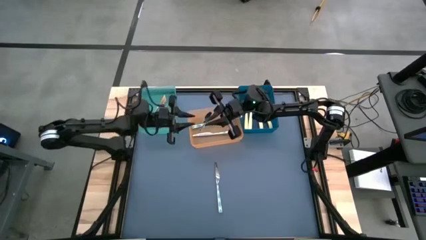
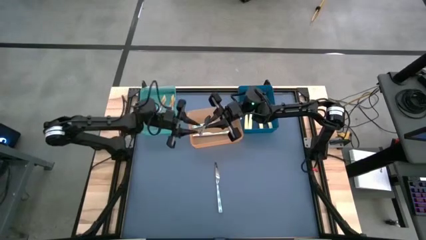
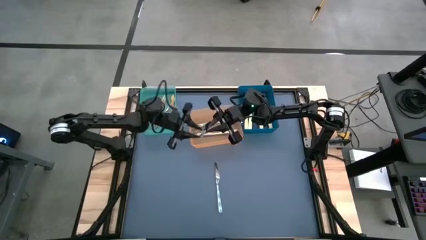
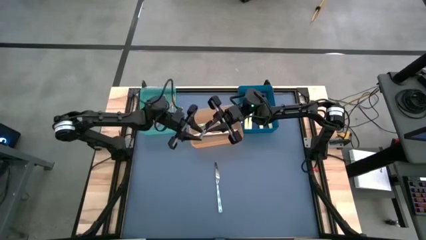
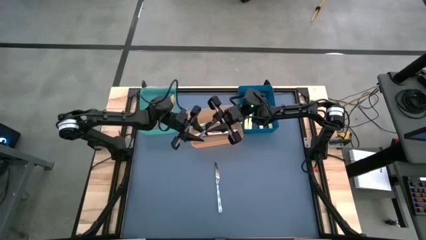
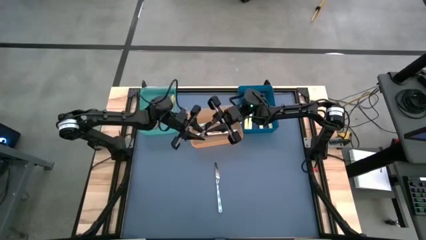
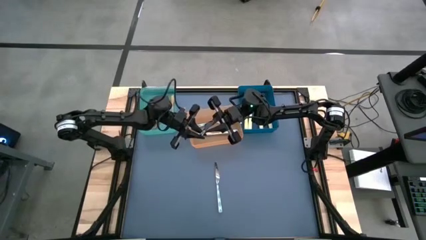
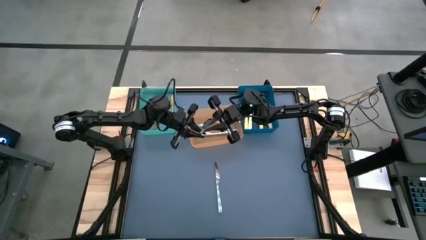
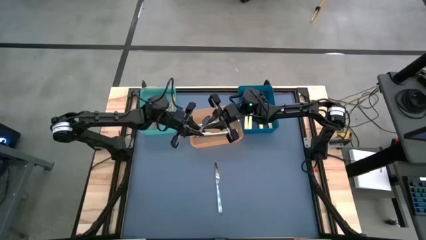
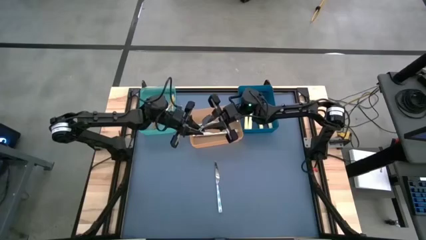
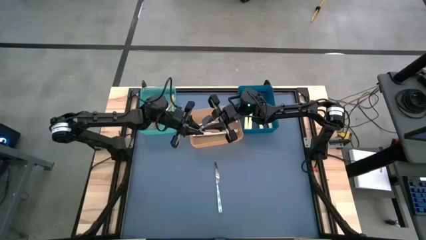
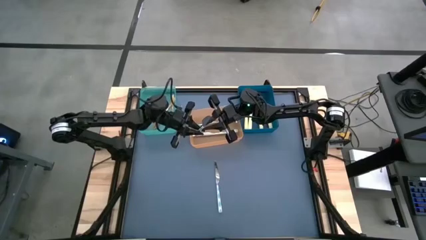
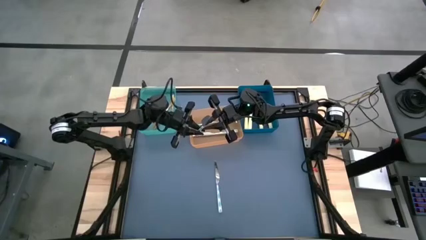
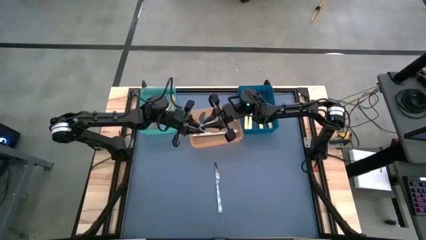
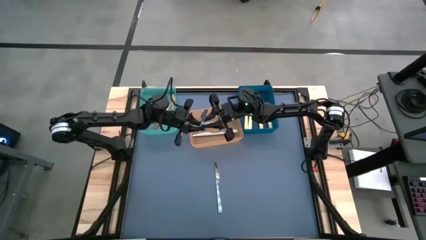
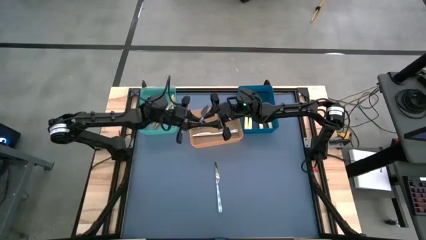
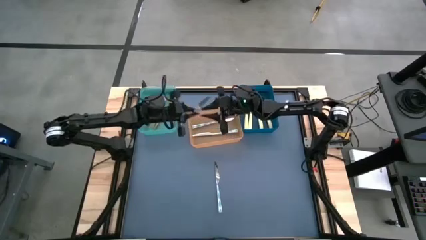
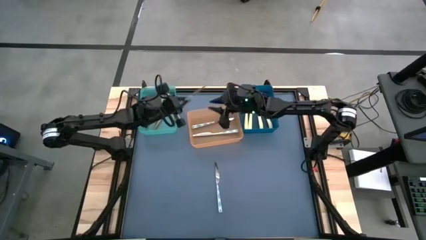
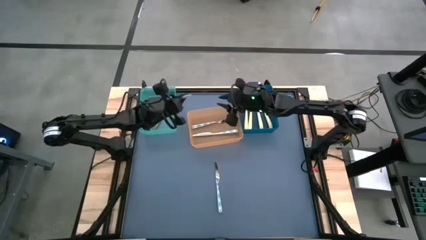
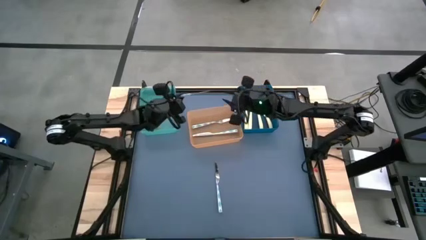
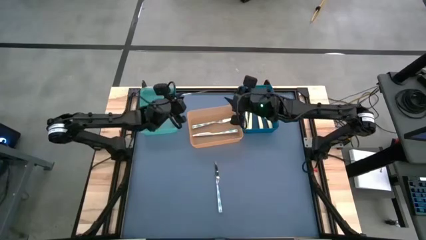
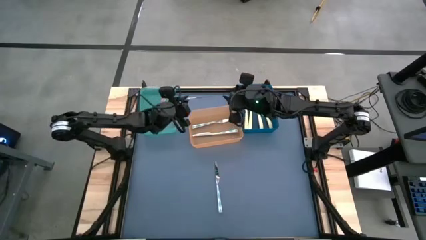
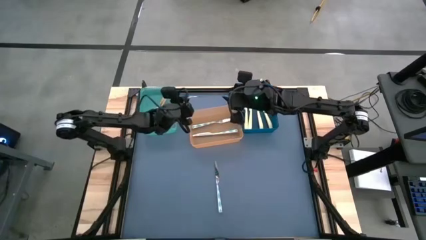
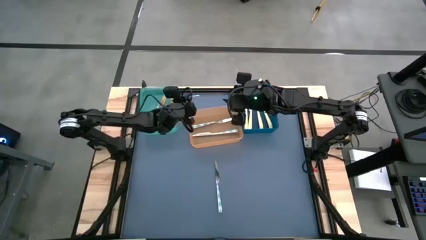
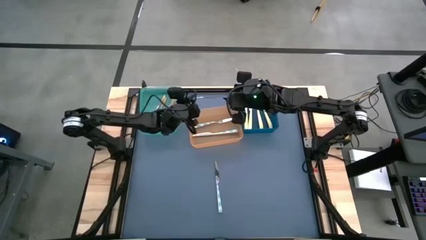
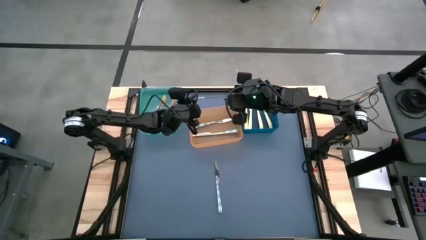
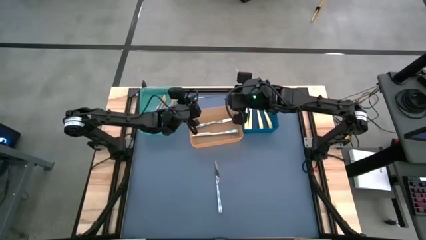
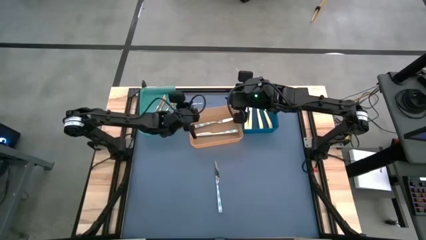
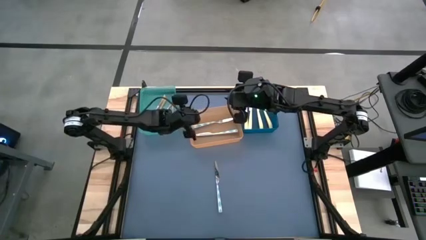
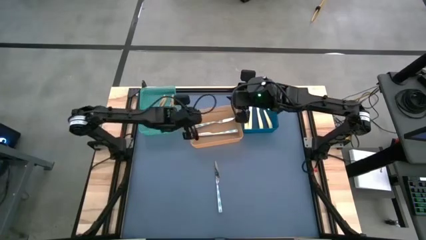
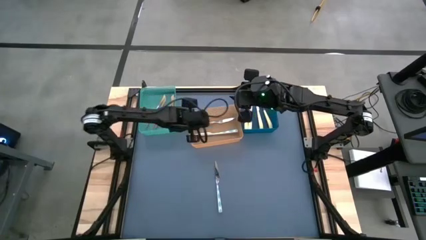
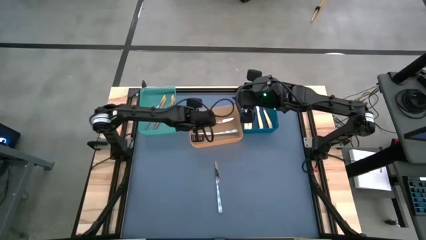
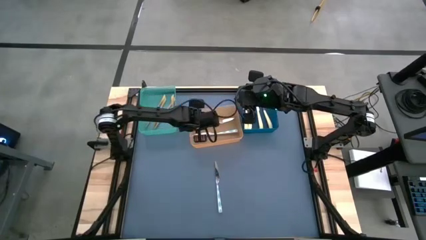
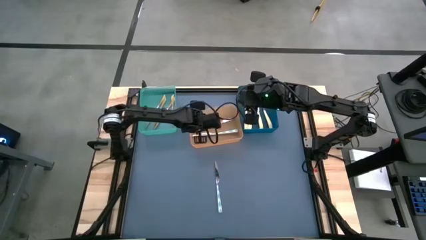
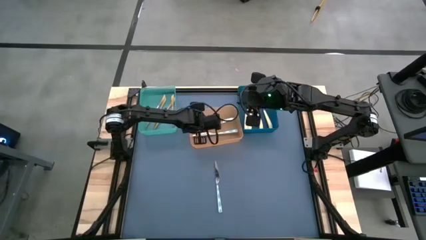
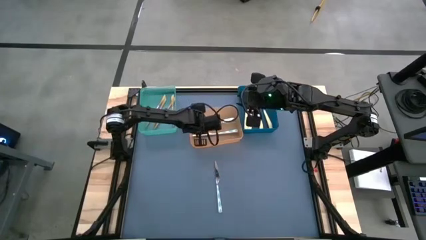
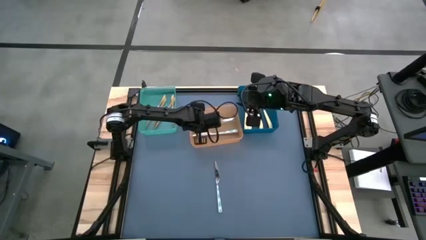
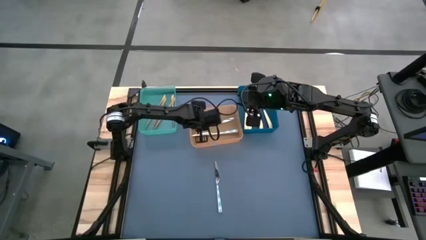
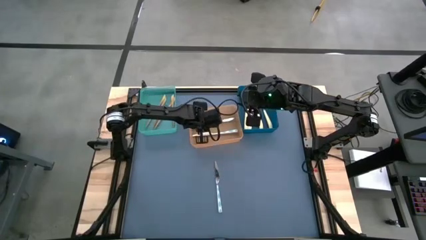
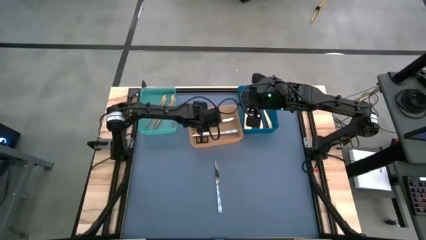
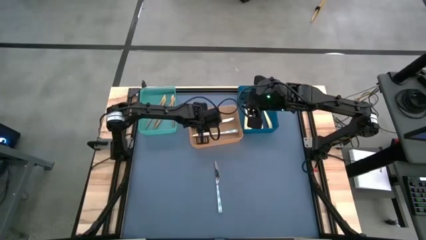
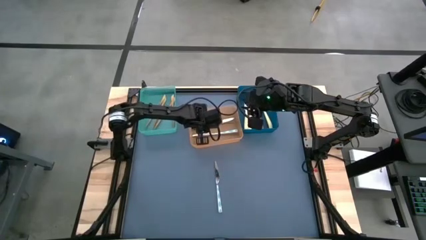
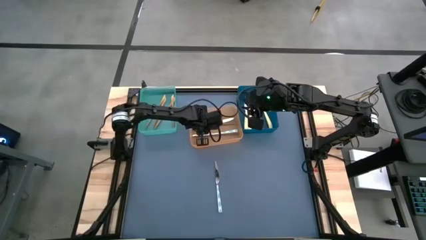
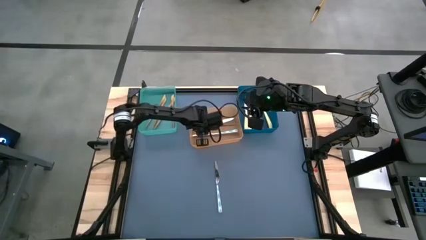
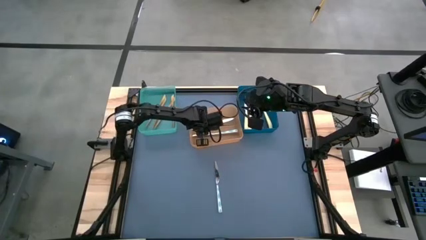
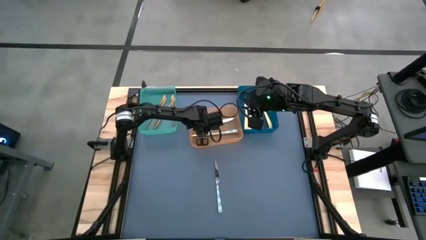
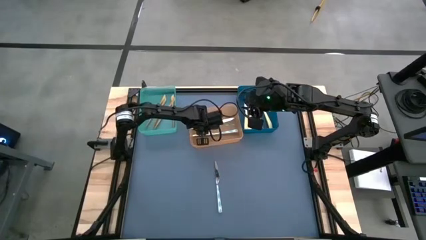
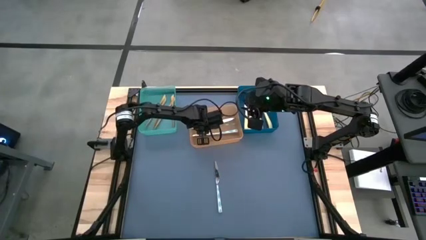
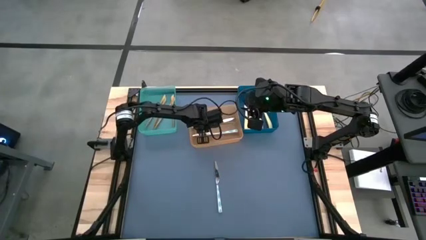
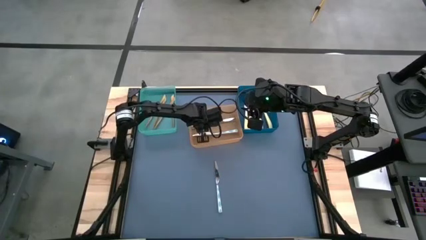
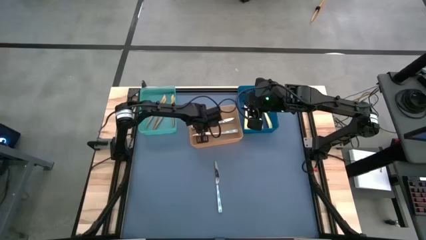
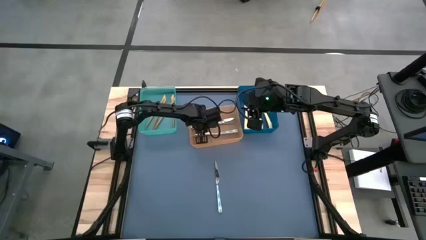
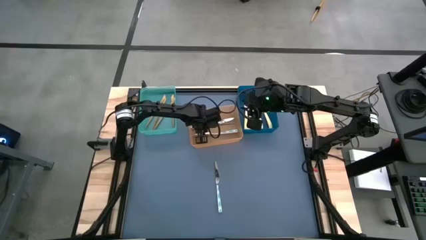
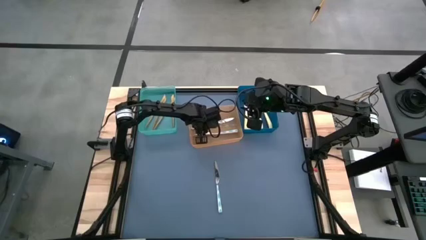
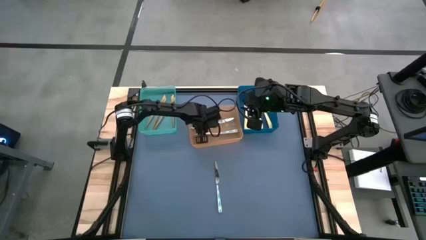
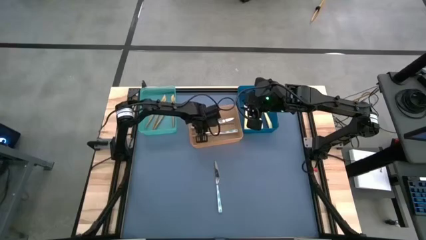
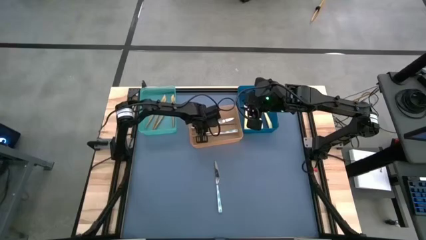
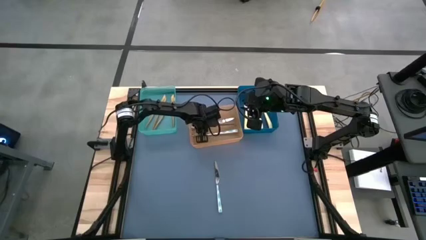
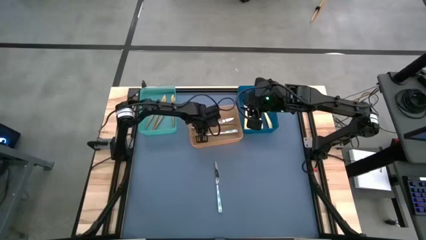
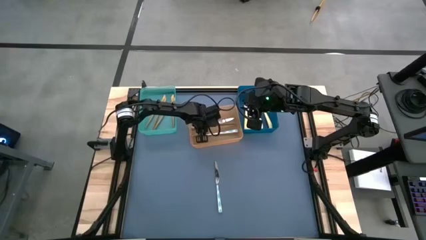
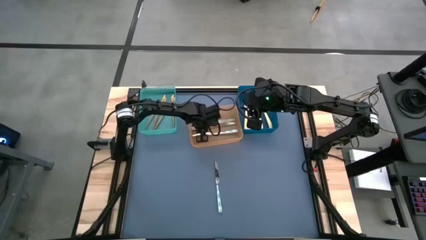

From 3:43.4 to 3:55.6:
Task: Sort silverware by color (type)
Put the white knife in the orange bin

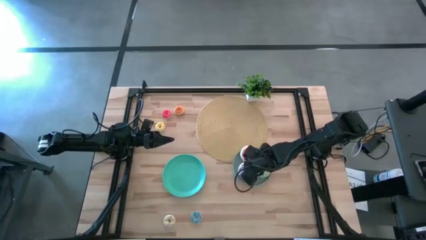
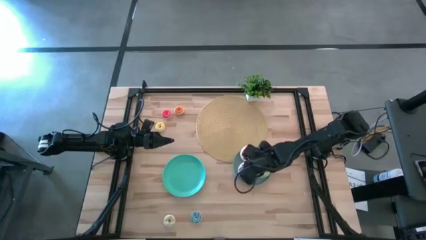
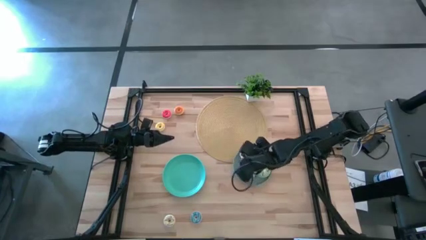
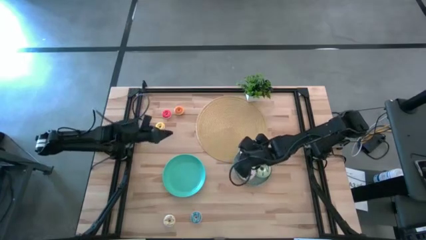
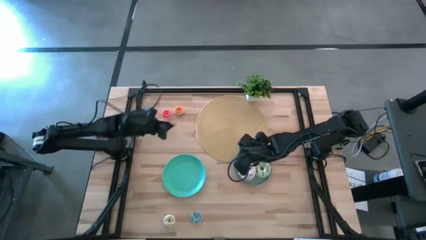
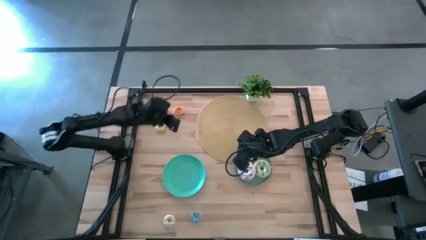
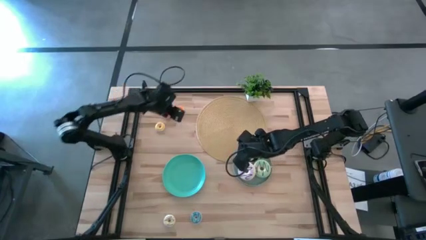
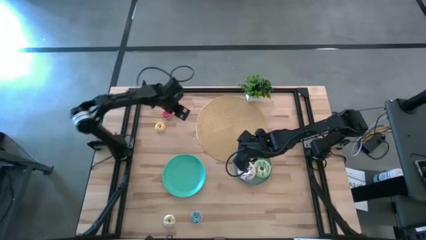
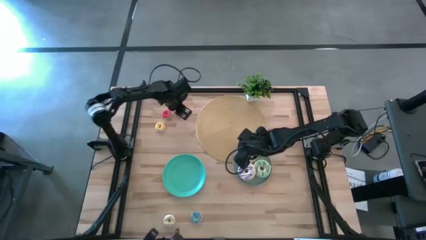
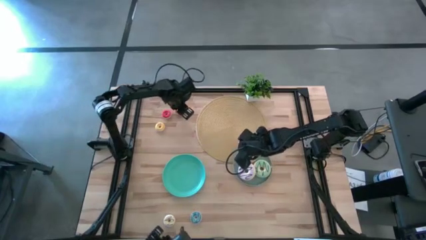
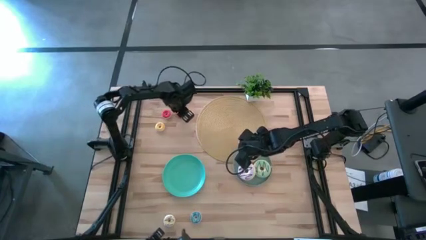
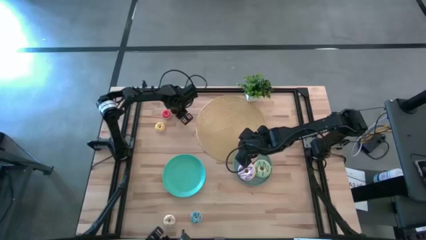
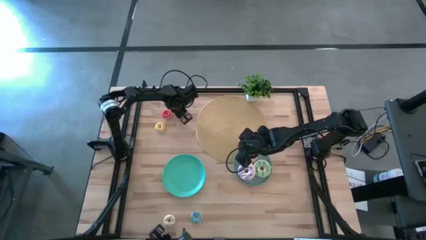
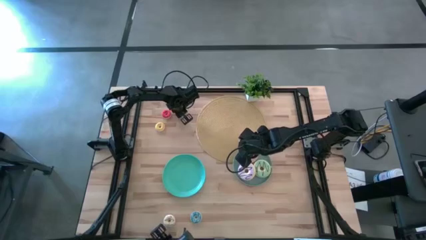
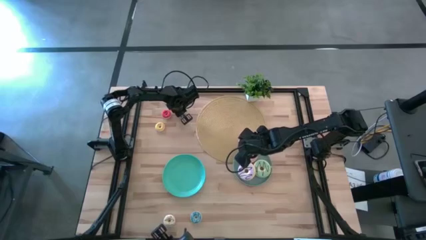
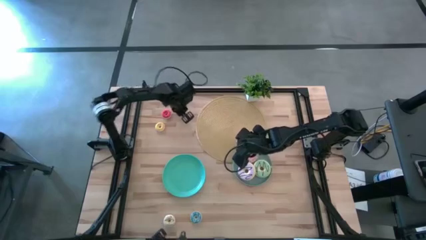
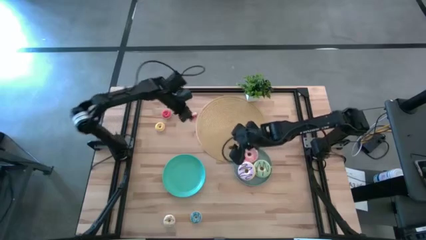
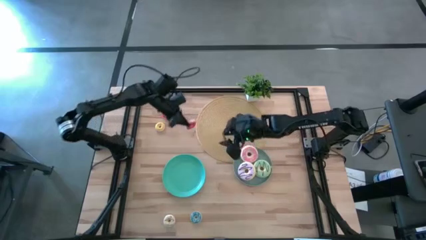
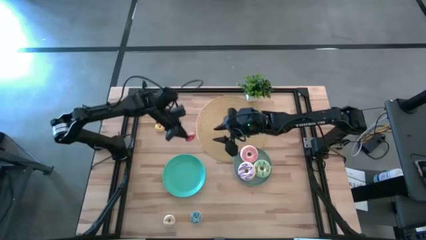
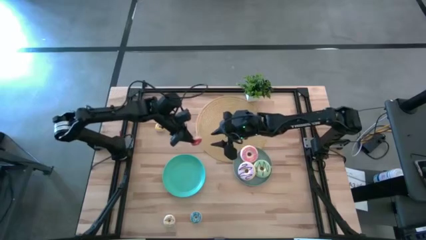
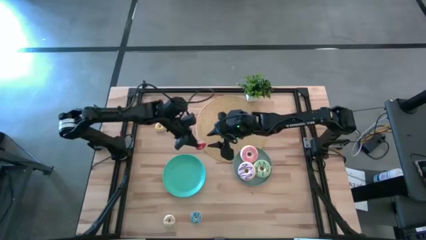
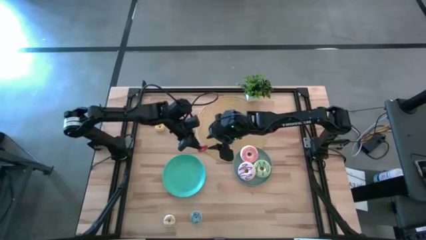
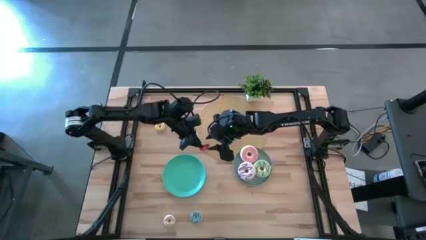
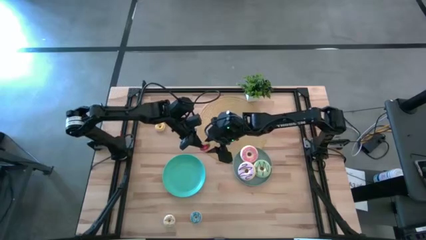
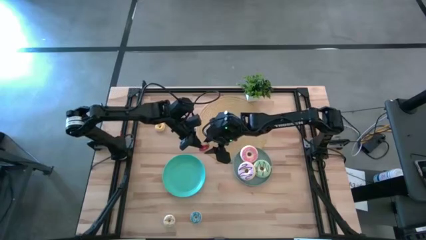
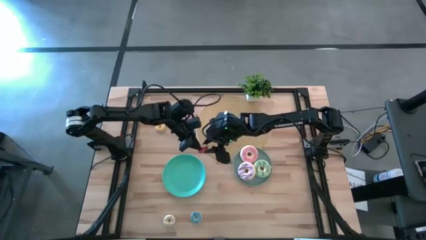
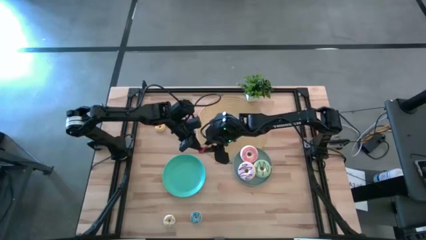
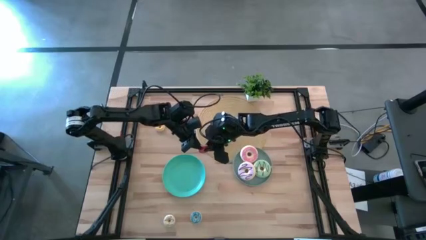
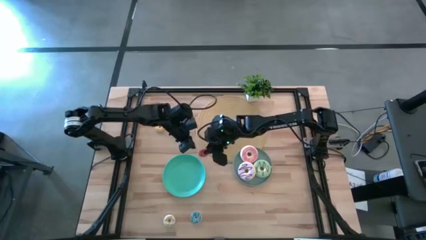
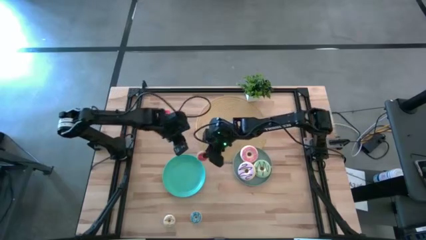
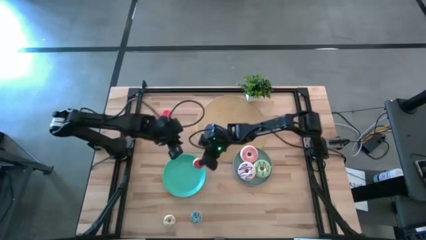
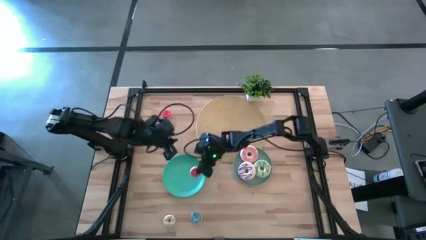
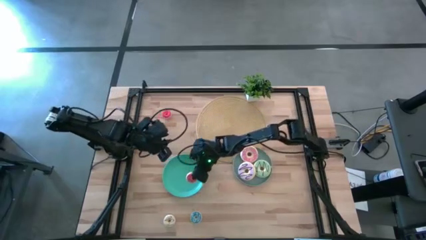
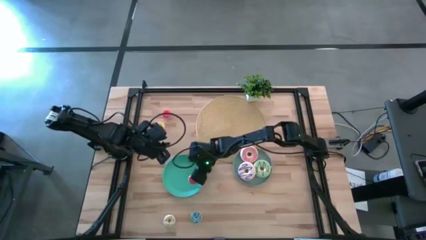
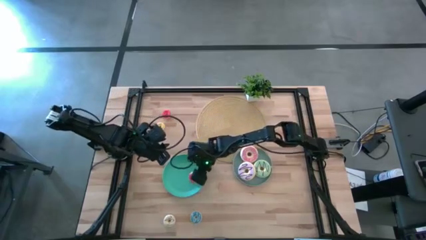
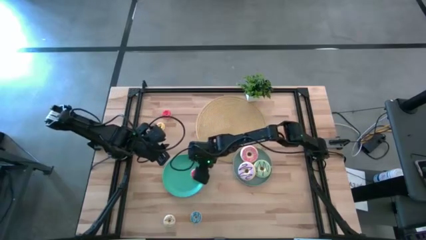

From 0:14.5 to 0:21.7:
Task: Pick & Place donuts
Put the small orange donut on the light green plate
